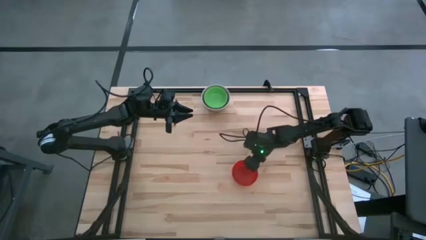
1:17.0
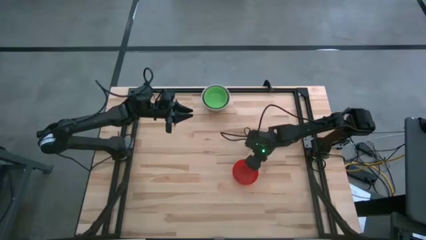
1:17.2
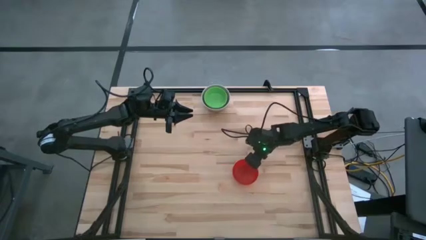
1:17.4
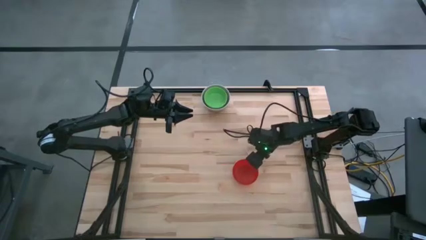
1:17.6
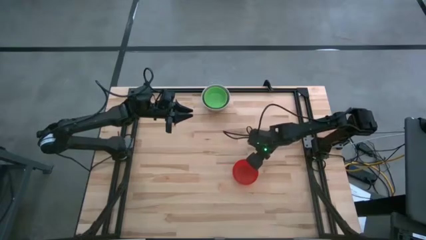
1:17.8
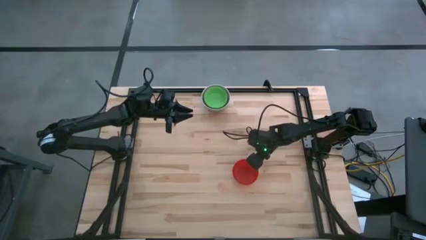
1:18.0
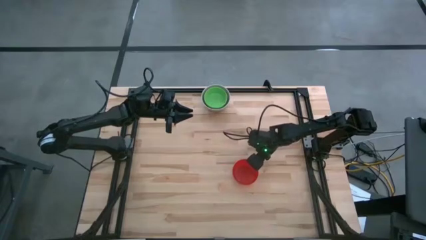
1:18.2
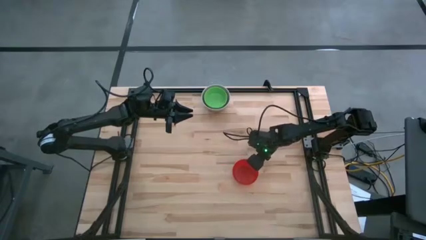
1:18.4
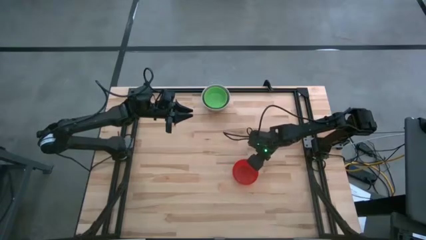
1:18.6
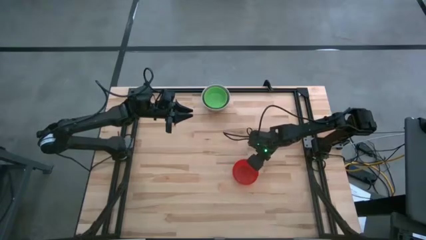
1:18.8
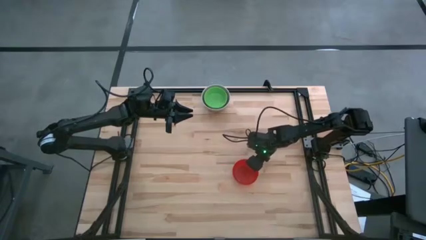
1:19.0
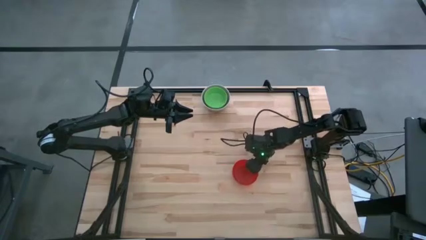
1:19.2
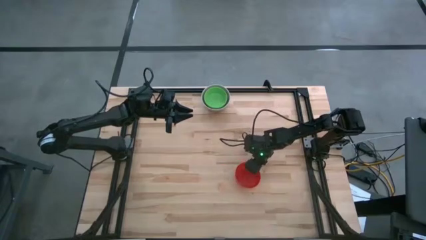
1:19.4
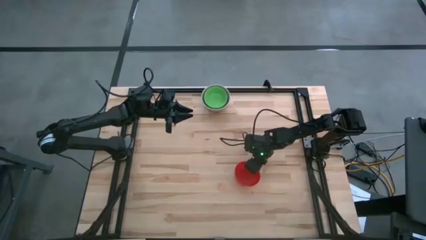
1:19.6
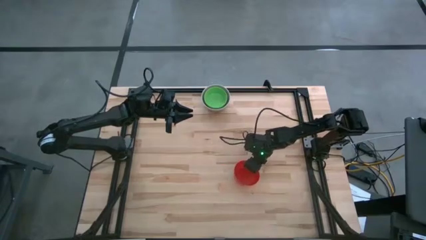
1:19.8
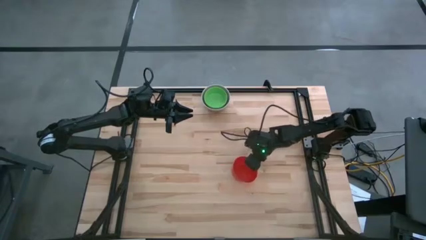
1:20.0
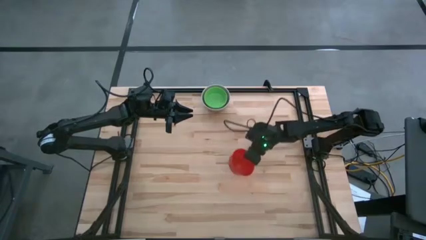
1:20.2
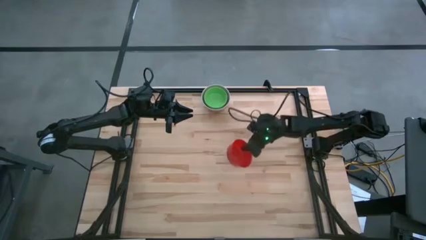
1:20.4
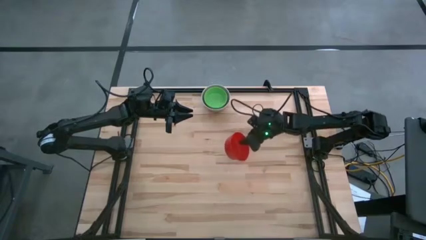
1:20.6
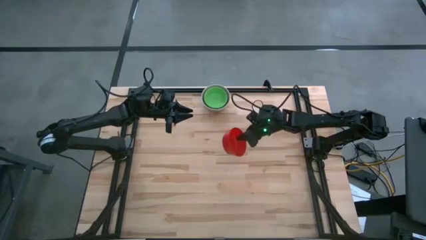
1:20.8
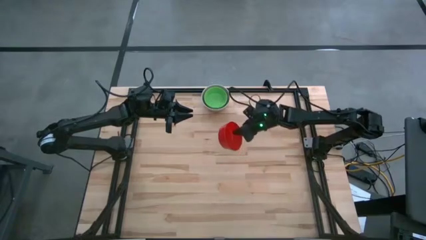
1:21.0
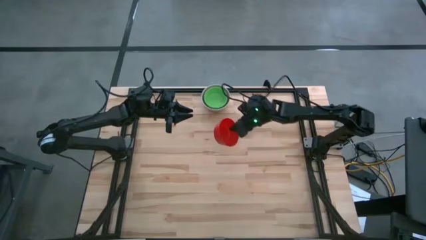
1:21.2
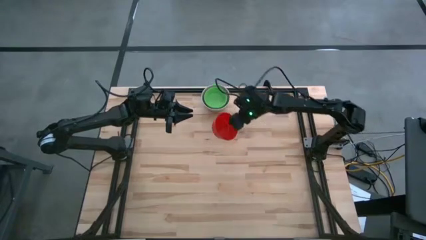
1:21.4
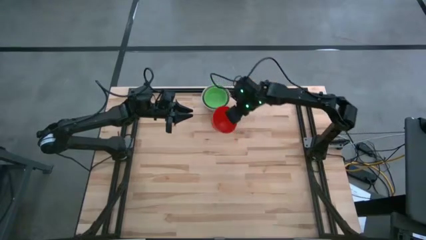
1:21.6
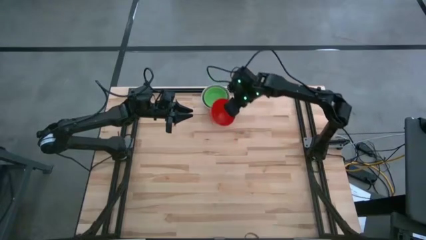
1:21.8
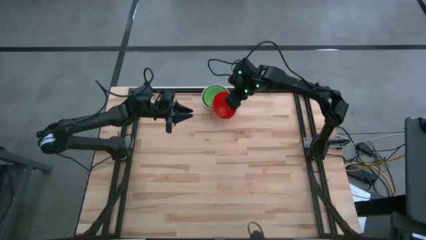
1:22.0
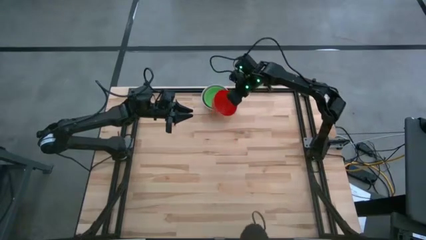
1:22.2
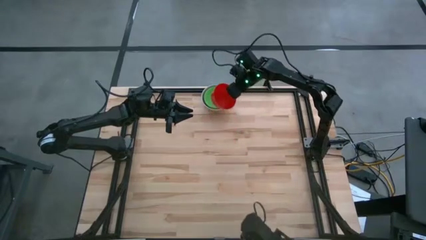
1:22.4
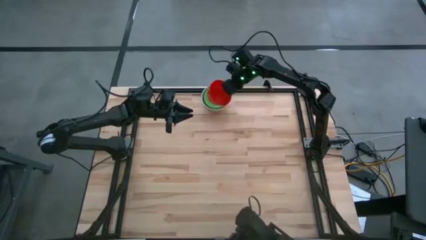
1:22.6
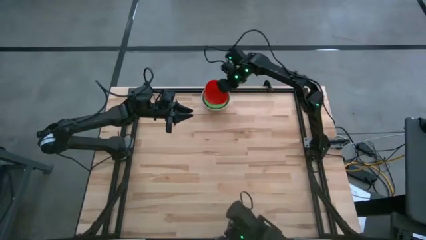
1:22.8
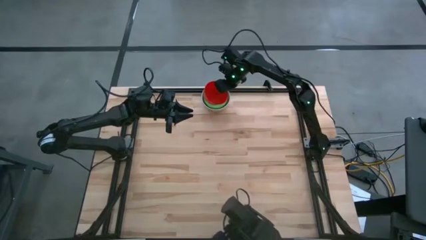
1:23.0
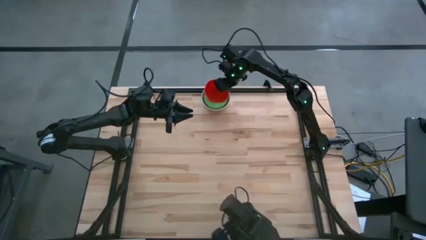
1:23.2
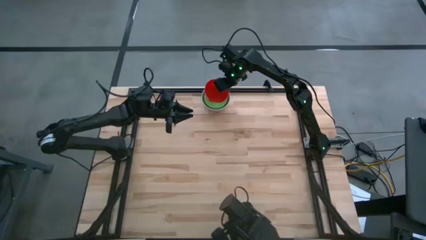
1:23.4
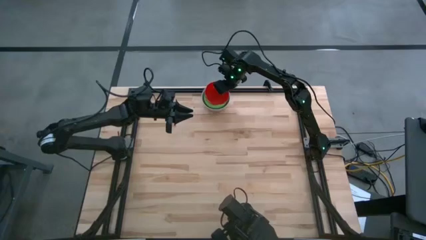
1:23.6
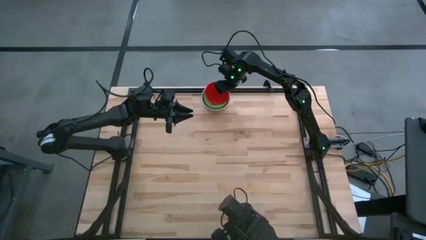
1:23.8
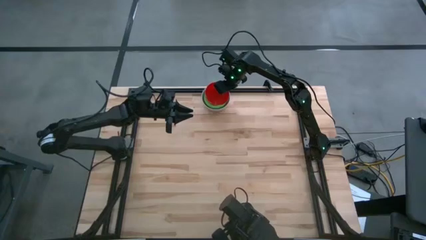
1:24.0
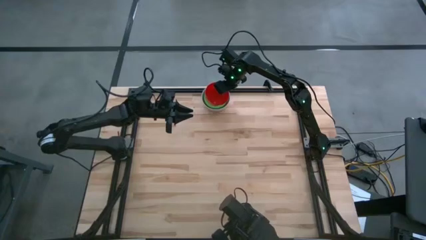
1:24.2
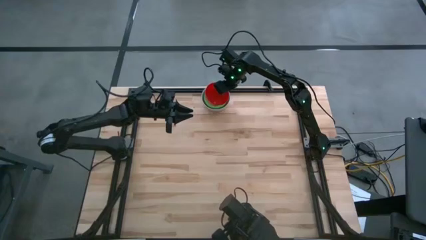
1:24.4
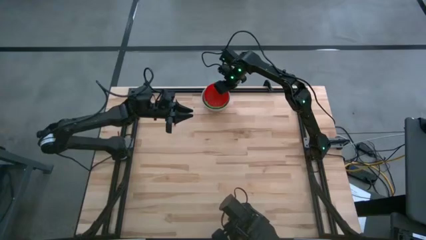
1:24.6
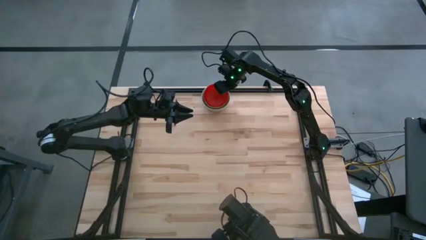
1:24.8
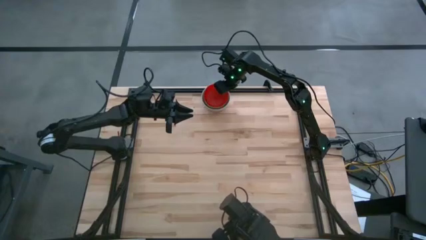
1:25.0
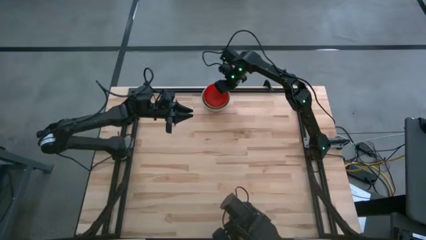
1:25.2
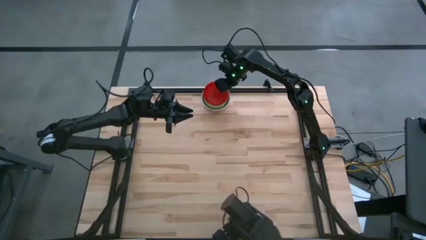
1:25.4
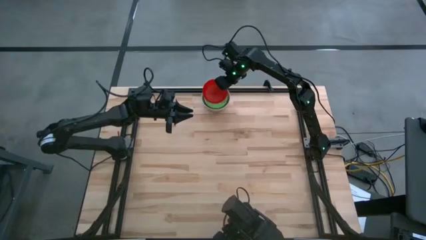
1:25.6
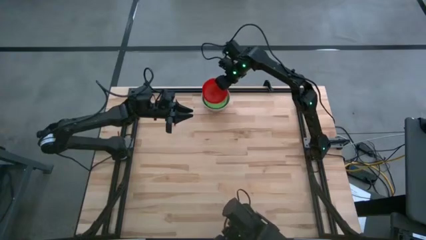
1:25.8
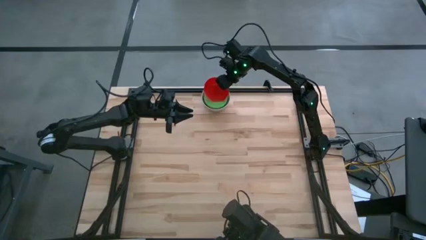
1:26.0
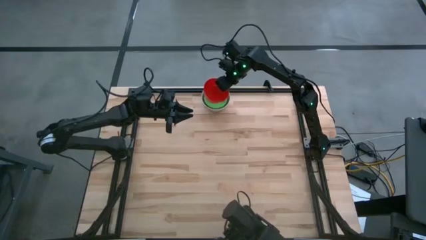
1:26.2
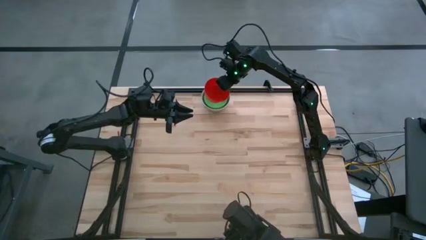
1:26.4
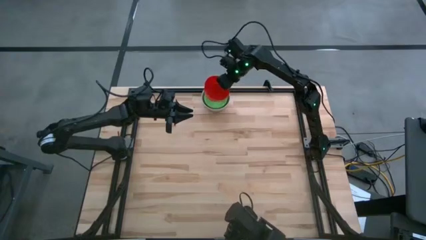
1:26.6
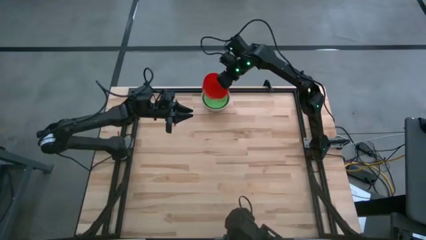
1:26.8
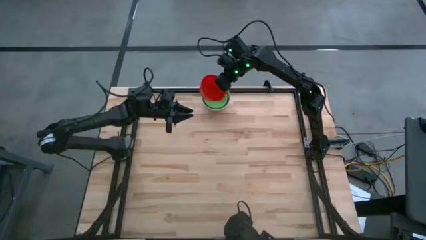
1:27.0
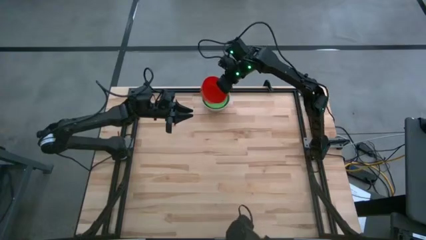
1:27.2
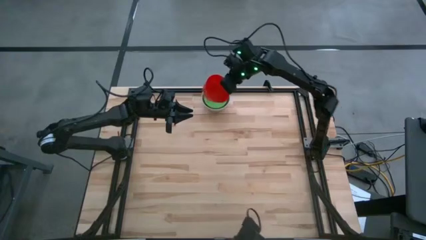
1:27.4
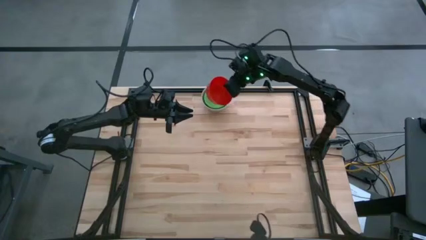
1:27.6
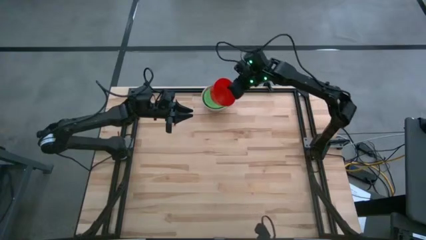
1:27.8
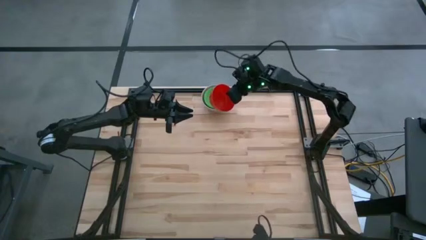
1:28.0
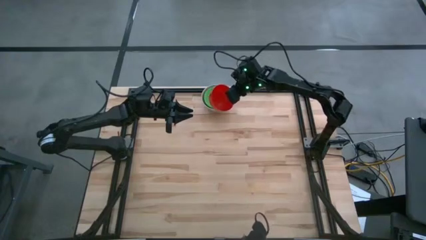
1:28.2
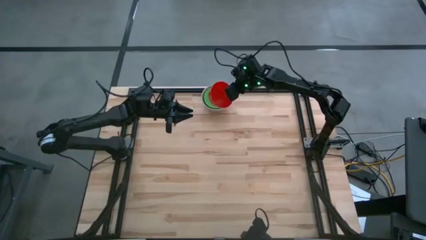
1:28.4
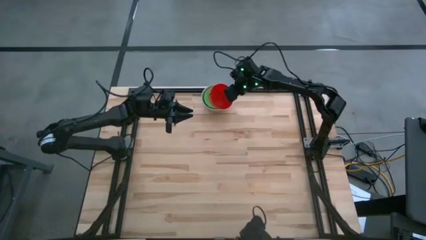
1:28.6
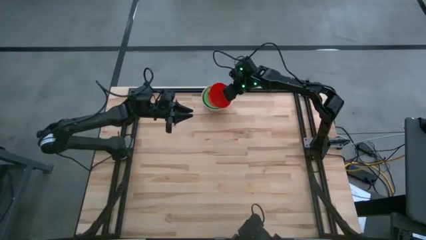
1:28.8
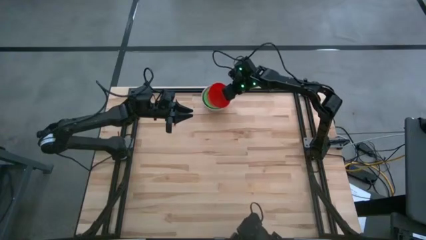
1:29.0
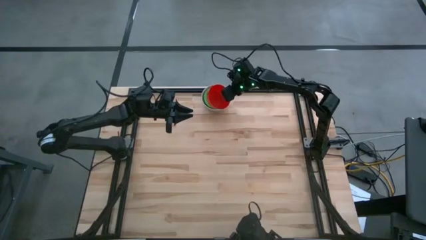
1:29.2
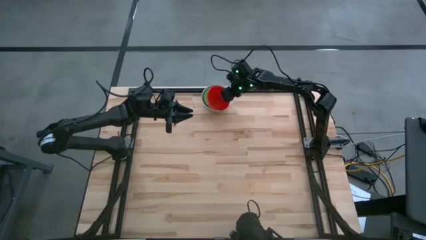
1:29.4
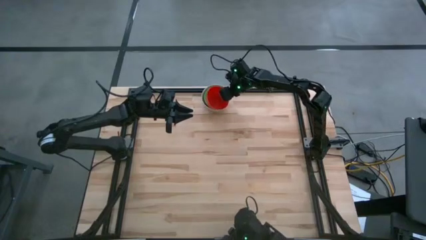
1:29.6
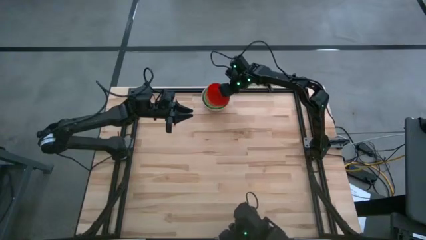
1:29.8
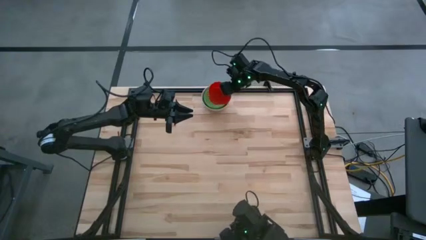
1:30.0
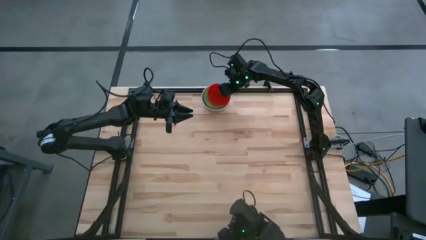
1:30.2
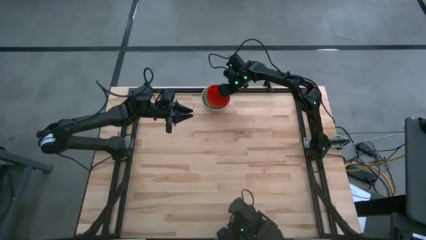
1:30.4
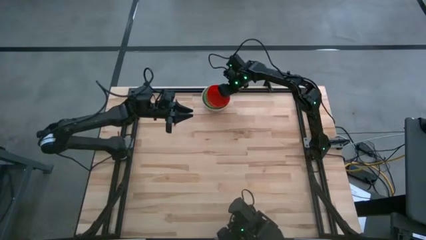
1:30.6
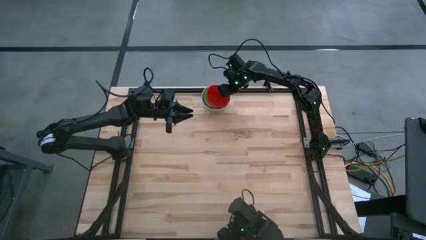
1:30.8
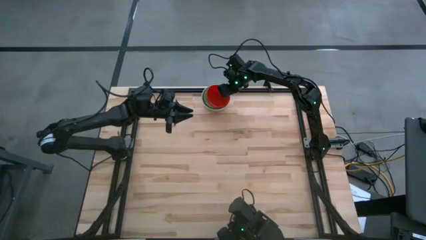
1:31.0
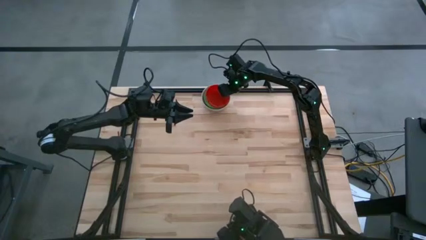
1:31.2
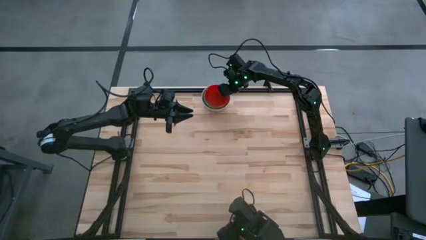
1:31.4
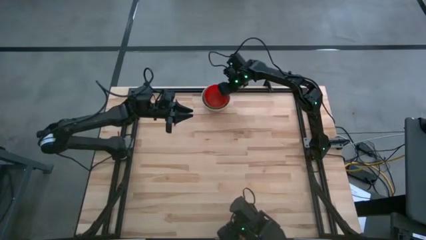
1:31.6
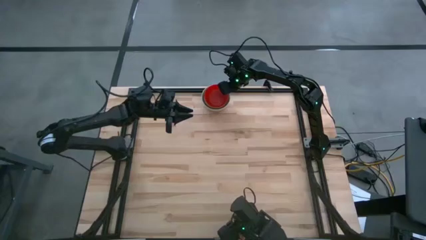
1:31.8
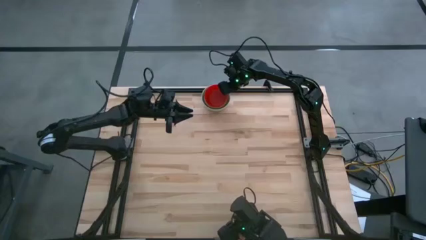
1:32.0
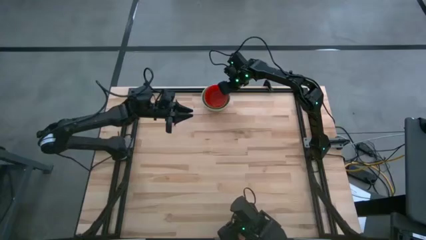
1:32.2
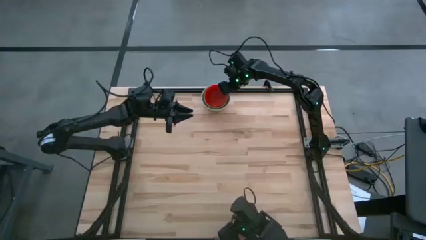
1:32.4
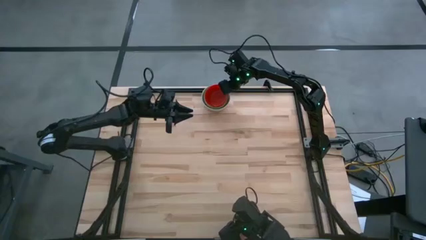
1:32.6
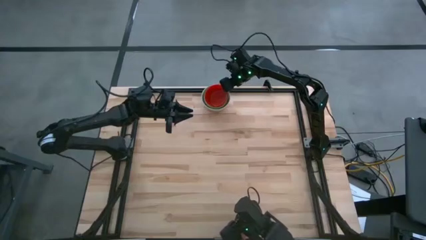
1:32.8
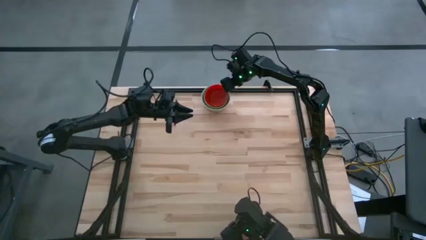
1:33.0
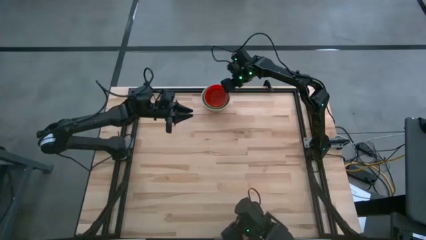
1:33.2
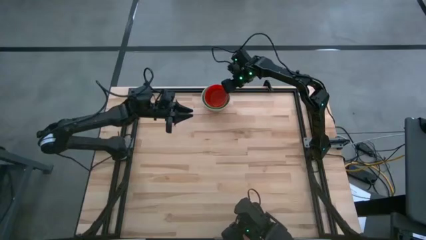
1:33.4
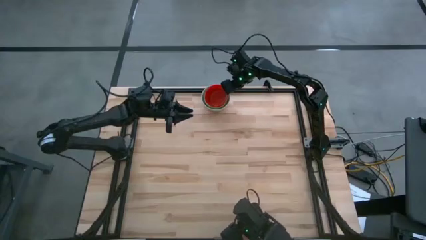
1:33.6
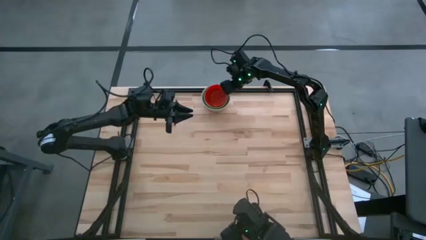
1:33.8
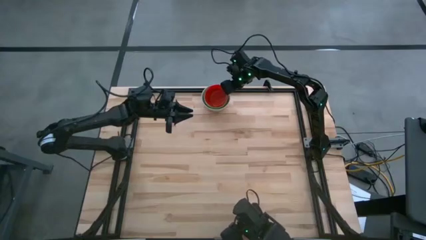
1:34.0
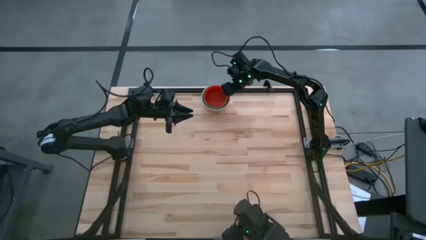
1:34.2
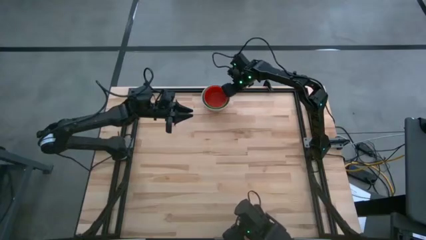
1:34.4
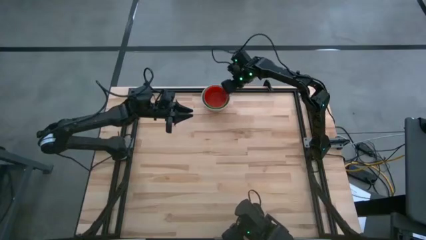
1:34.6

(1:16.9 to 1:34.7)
Stack the red bowl on top of the green bowl
